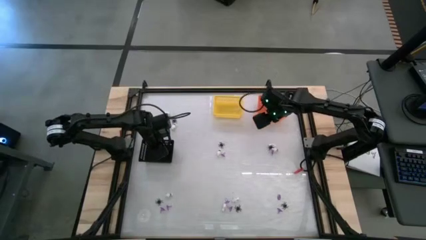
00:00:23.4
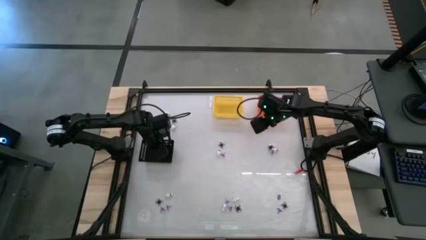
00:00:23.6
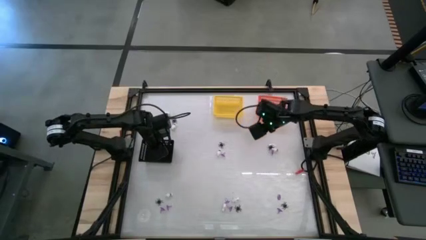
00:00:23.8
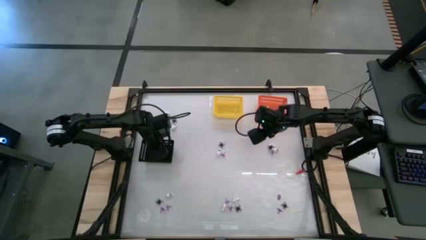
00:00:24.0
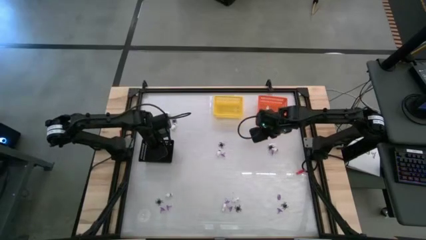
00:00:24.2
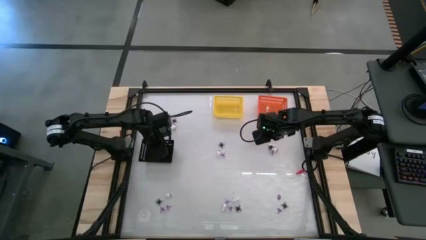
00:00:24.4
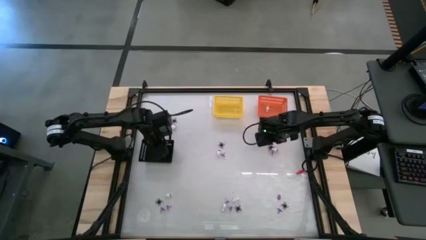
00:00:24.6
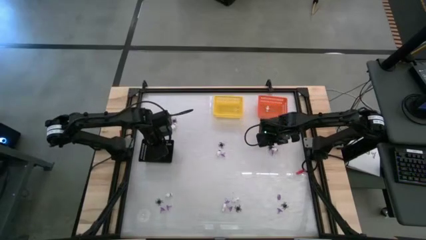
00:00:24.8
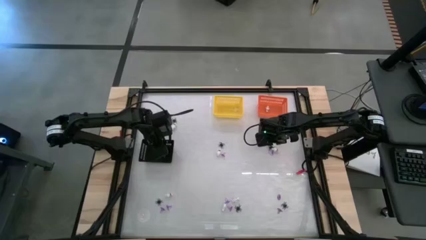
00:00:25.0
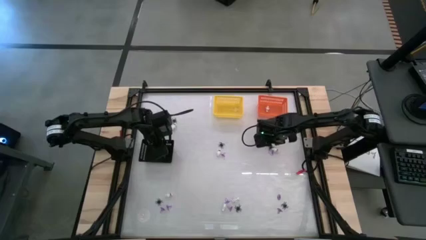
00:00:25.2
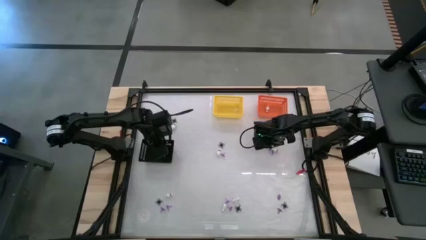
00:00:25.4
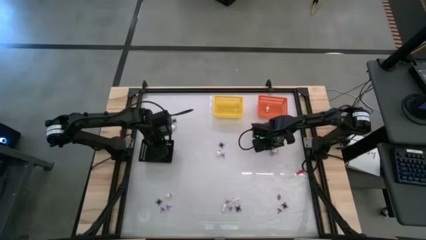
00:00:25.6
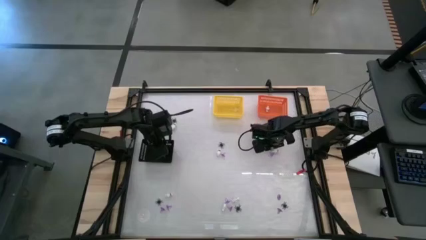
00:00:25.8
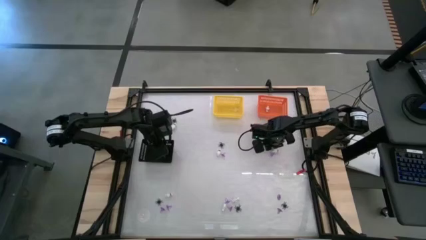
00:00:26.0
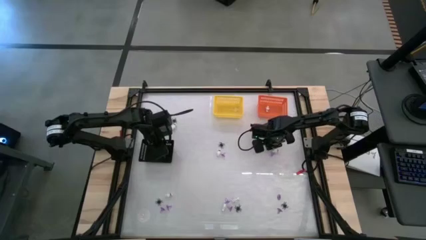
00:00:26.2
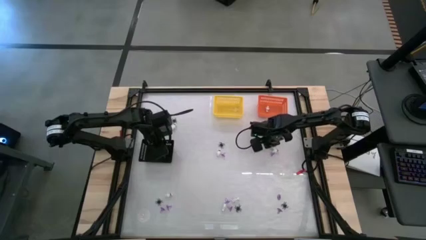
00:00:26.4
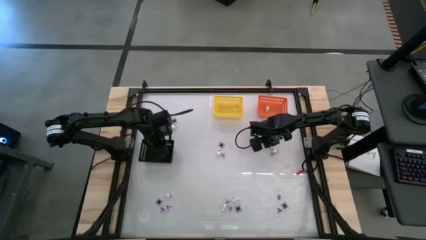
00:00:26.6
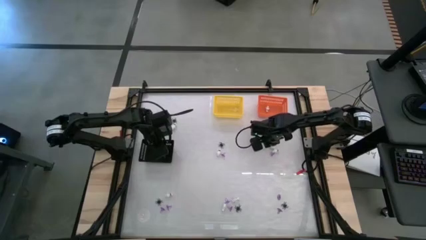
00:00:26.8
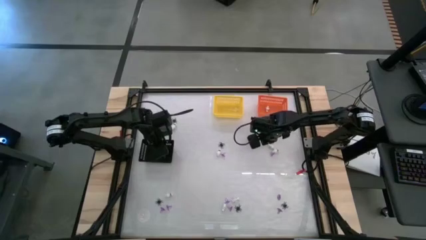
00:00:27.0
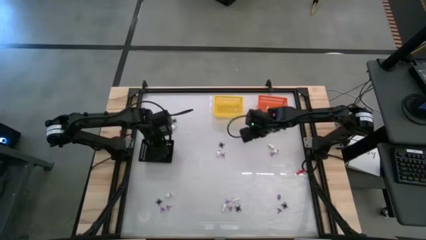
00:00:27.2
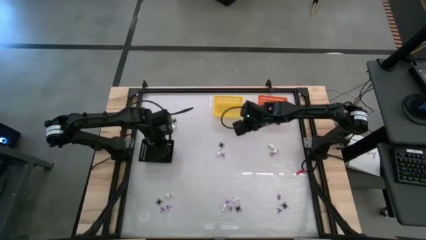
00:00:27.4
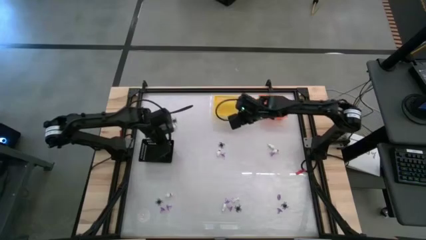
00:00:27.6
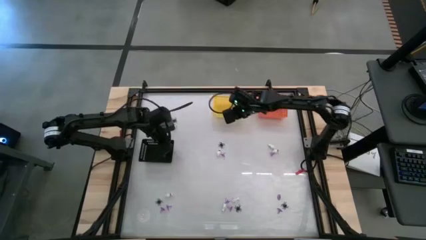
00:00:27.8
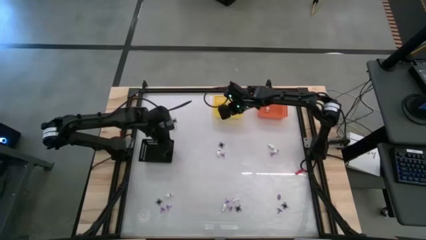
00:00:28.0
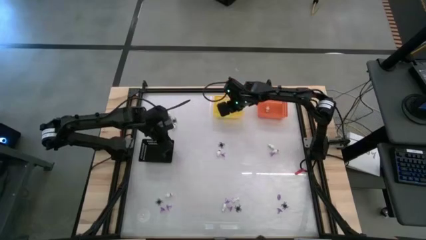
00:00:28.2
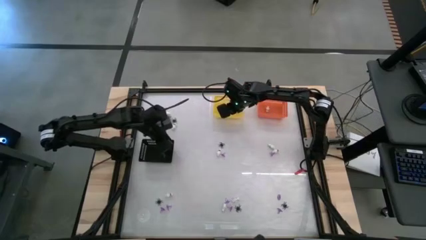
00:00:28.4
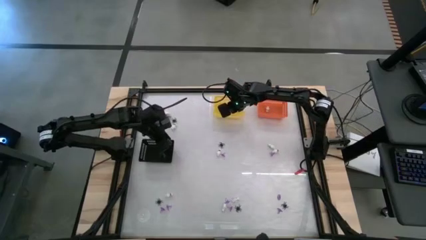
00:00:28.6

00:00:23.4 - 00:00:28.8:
Task: Sort Halloween decoration
Put the black spider toy into the yellow bin

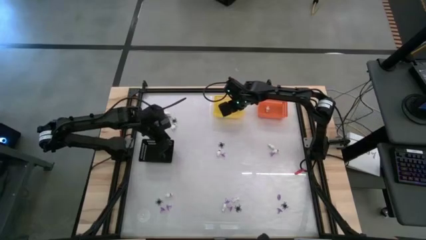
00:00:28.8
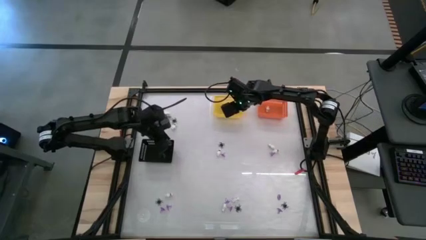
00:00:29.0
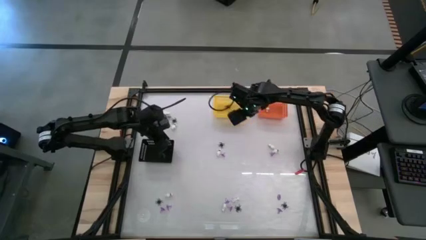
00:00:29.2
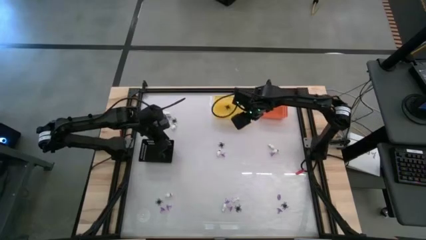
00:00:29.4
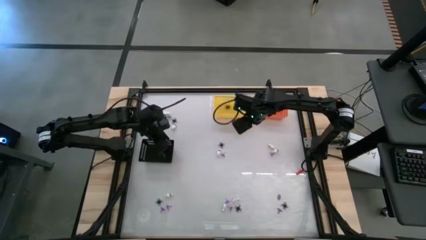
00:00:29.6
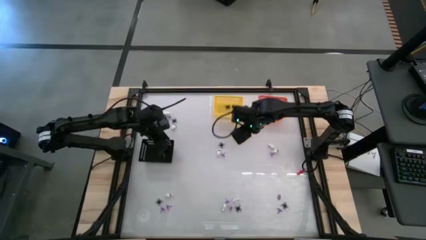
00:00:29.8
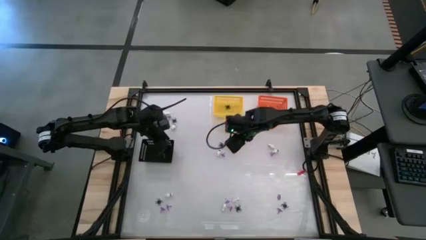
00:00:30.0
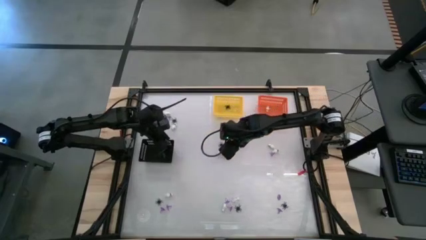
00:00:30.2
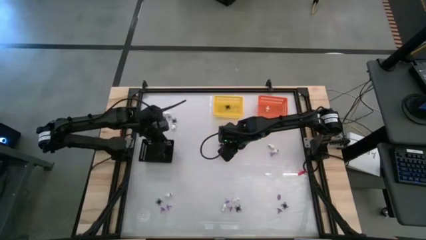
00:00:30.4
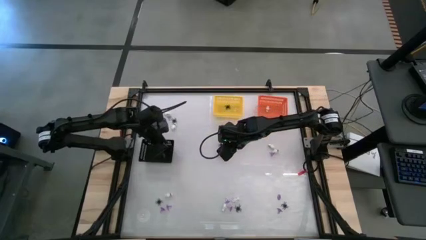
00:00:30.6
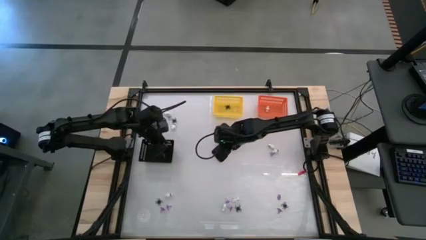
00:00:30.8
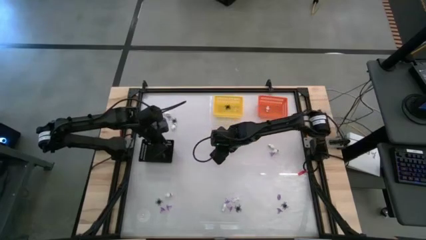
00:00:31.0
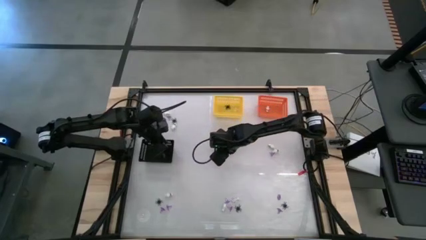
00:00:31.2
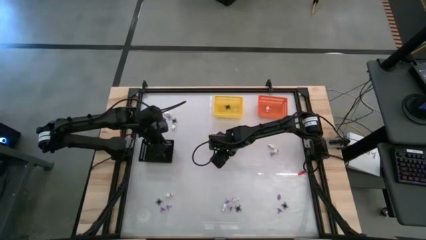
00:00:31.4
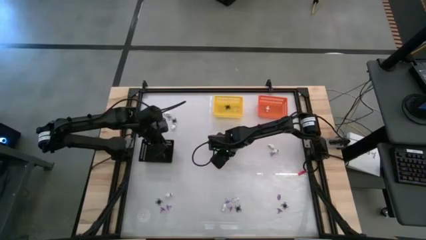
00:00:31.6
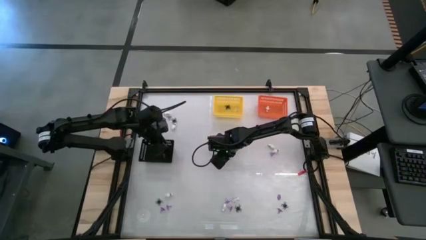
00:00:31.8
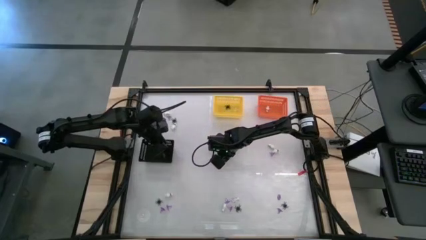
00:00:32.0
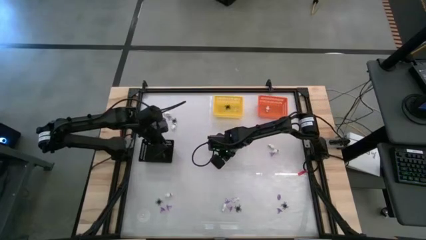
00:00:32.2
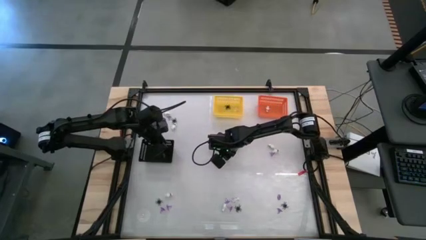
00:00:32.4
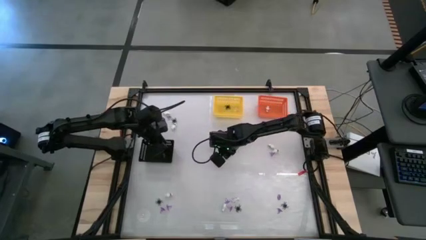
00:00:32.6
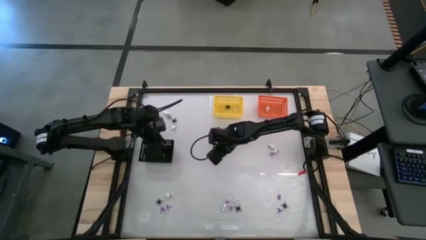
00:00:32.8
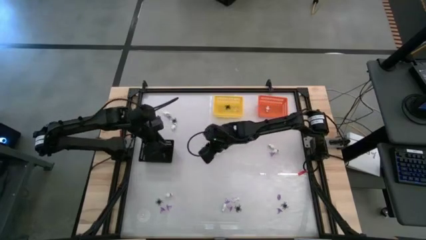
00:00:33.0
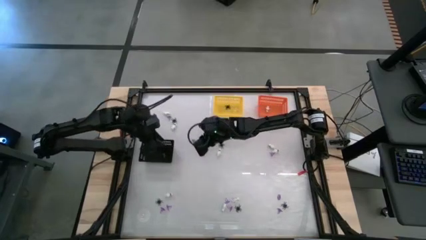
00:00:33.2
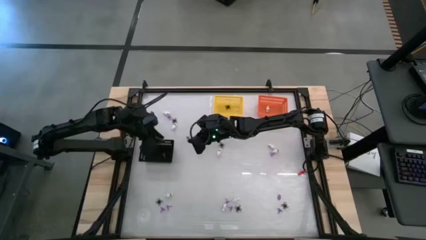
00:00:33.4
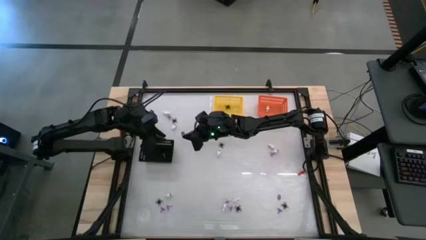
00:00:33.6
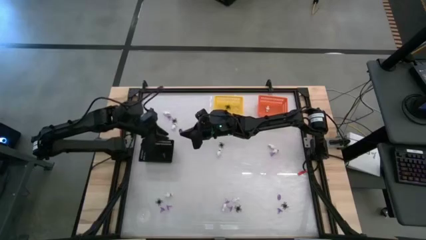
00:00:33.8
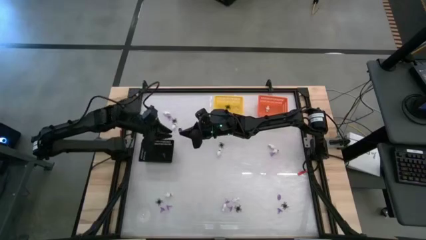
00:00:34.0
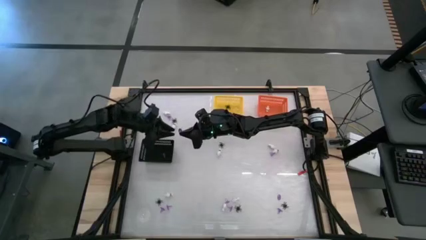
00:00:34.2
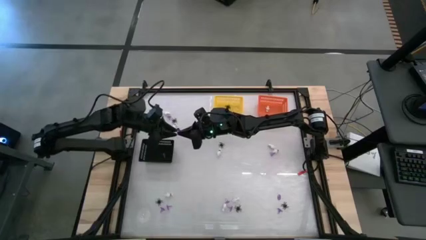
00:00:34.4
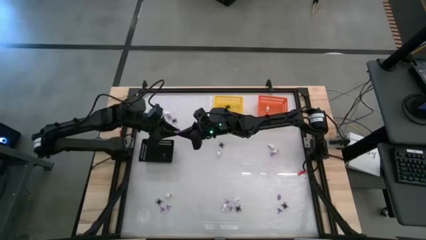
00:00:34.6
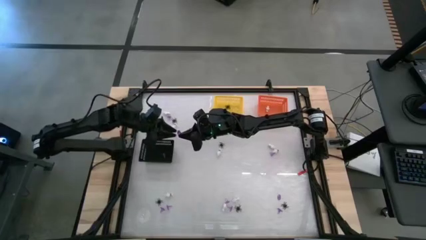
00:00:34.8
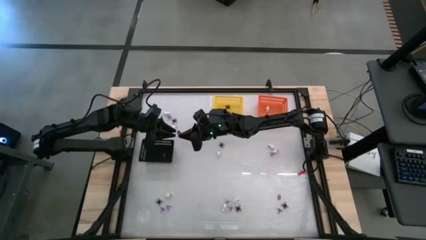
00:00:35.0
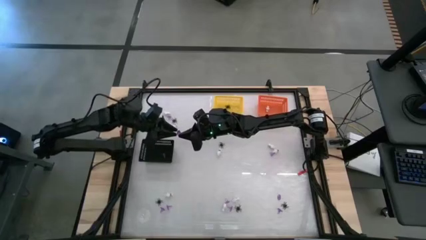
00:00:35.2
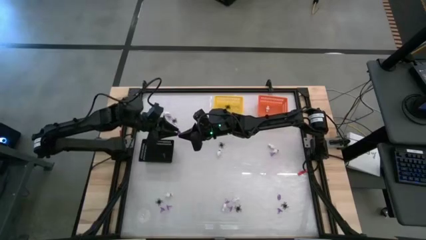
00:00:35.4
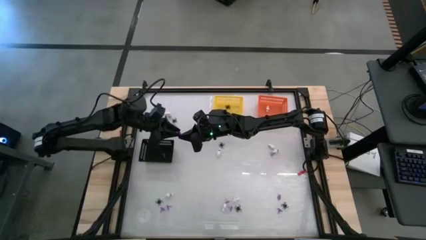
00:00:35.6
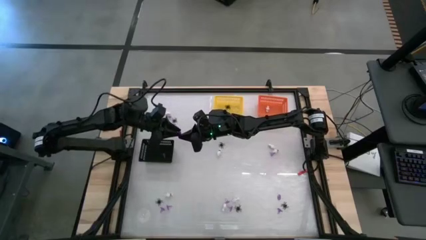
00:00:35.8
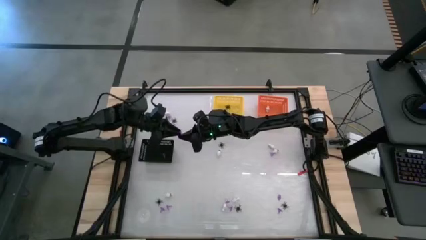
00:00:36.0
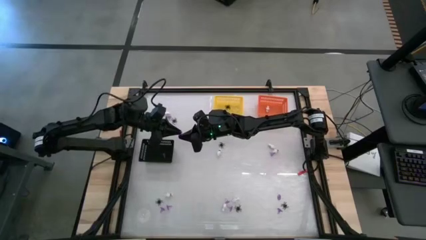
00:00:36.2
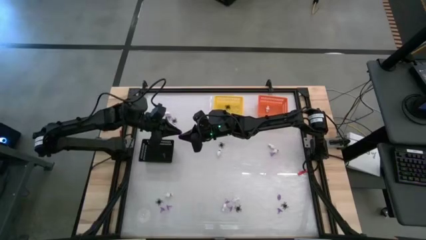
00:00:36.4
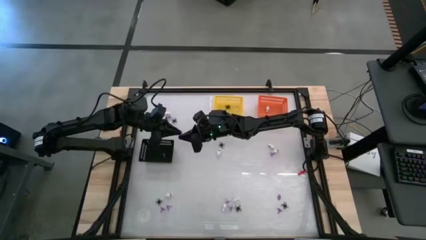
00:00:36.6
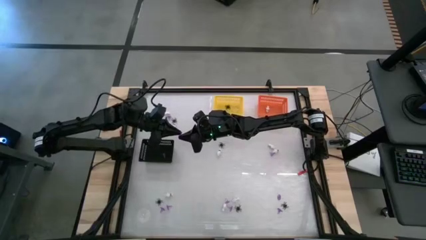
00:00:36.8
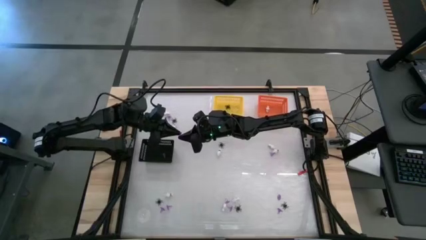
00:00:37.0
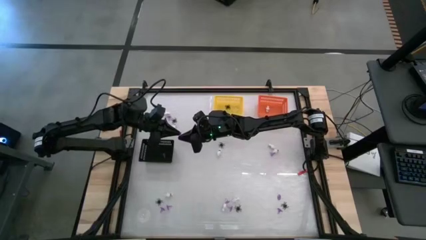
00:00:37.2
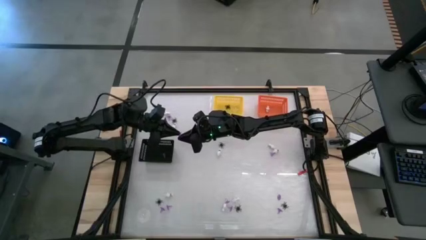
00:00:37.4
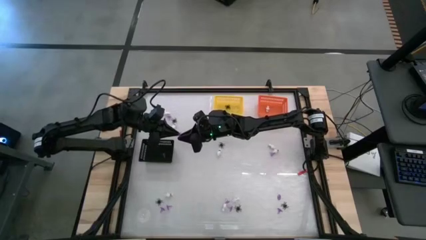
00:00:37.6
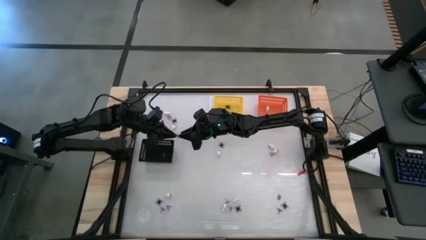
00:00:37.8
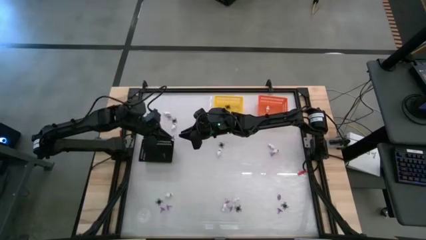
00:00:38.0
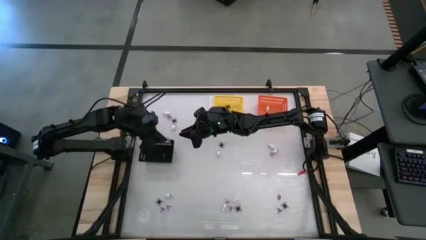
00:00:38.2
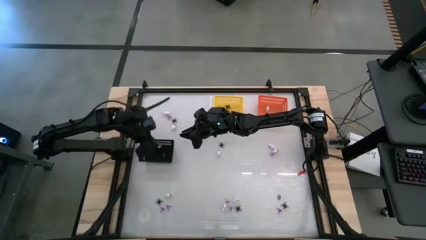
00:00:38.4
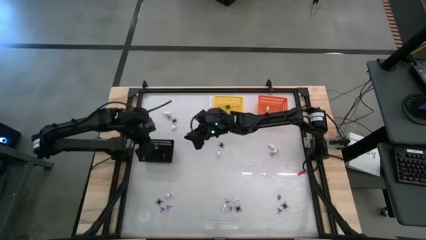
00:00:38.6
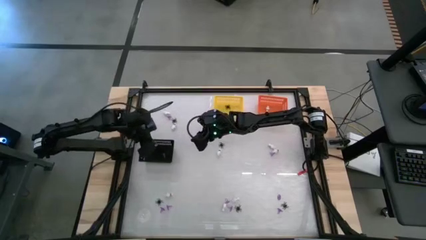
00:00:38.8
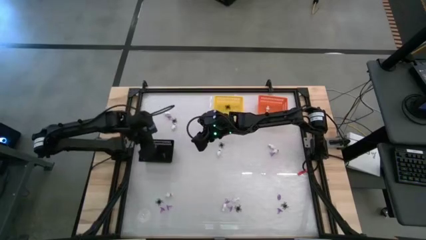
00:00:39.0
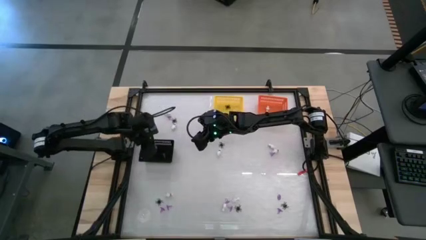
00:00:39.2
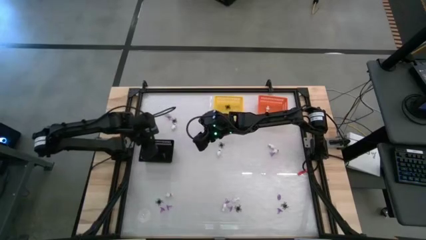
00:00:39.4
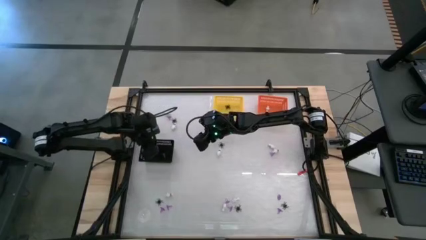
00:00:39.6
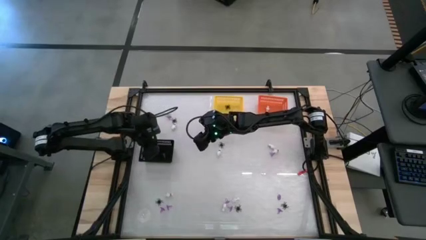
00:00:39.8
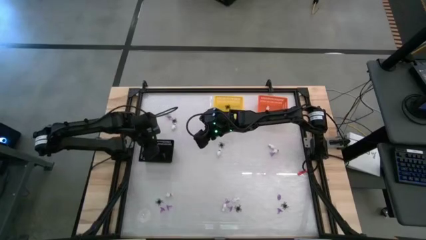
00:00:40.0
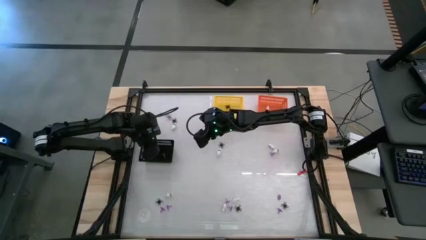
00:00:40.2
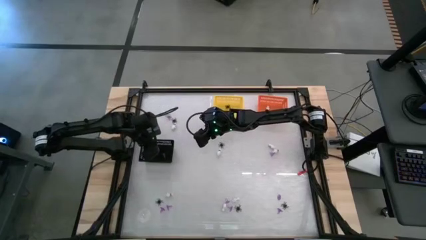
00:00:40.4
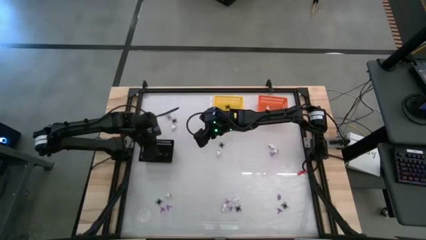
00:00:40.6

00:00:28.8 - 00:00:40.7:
Put the purple witch hat toy into the black bin
